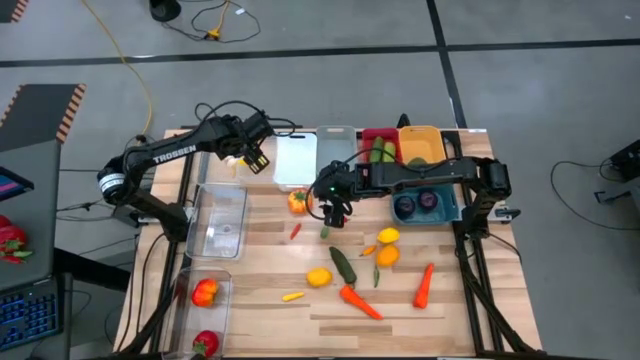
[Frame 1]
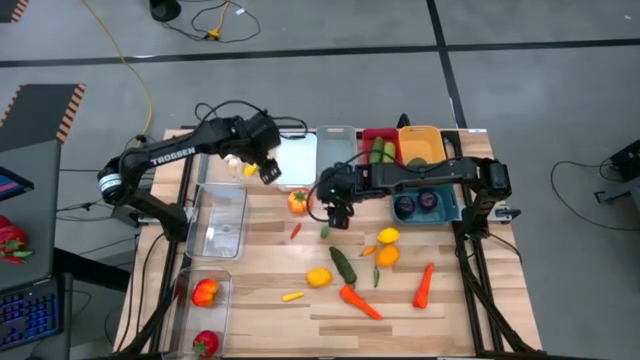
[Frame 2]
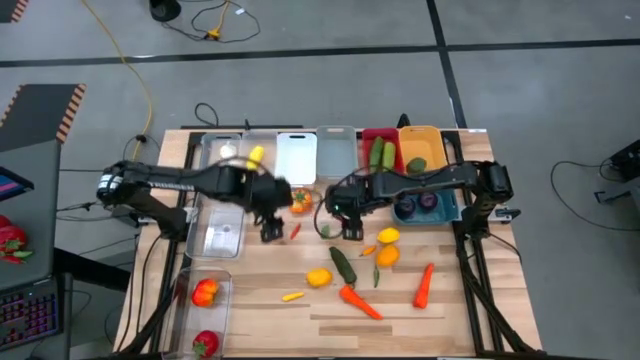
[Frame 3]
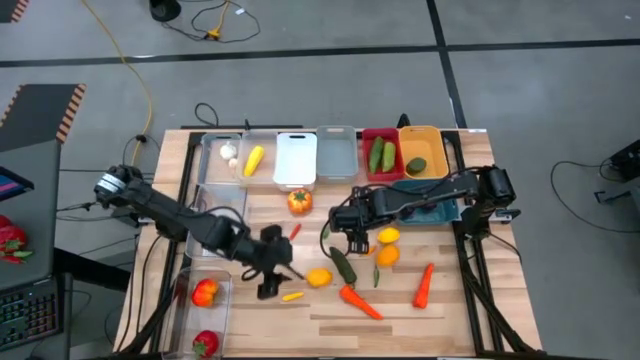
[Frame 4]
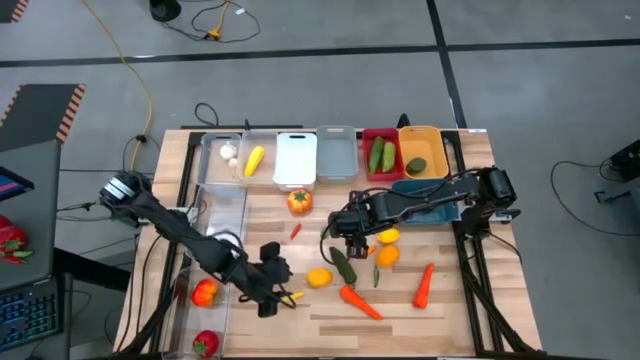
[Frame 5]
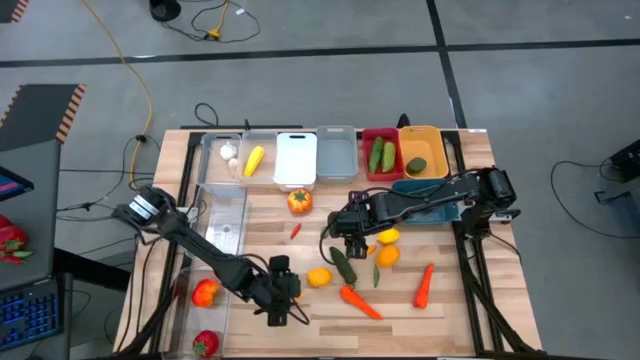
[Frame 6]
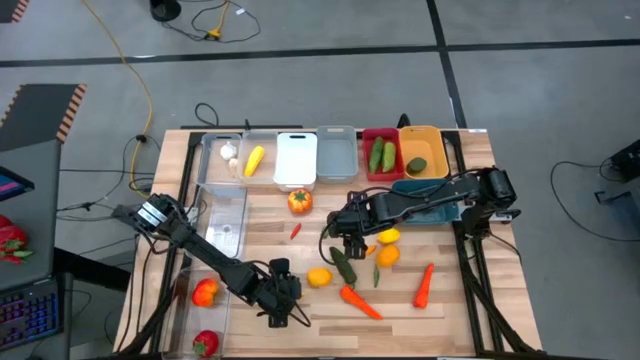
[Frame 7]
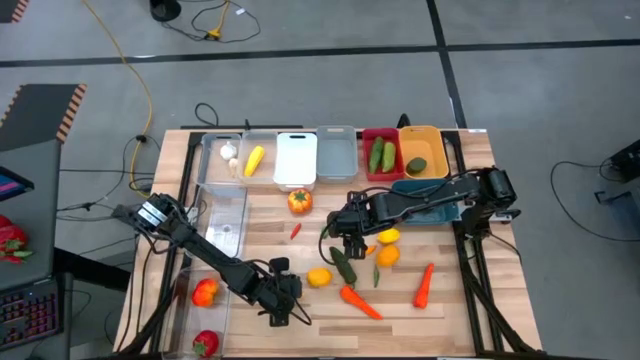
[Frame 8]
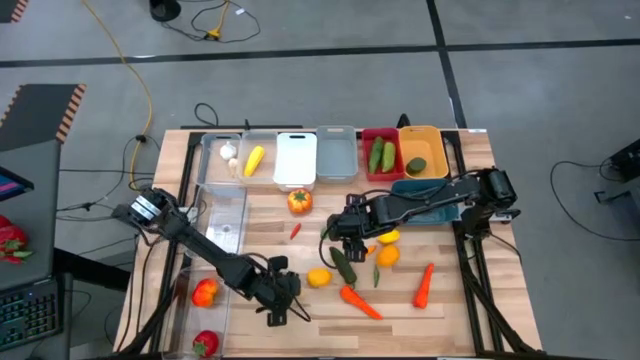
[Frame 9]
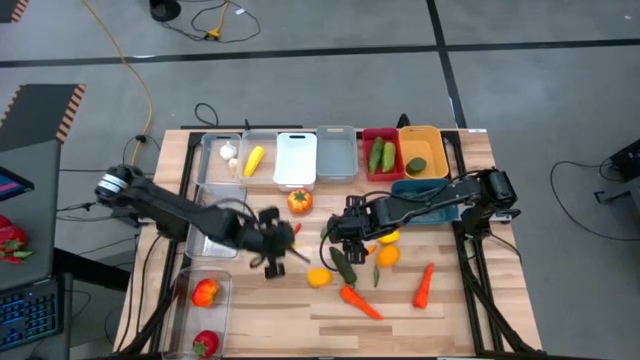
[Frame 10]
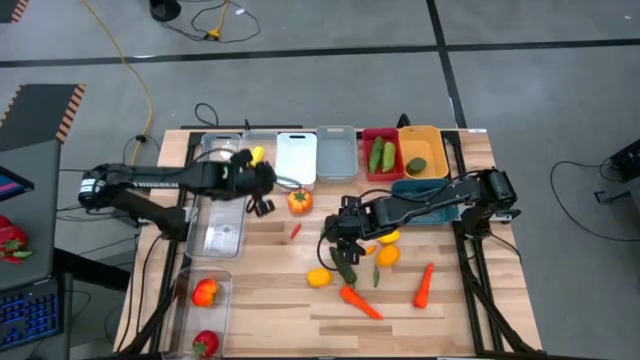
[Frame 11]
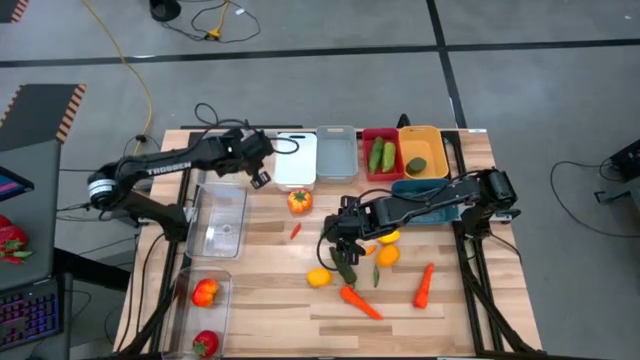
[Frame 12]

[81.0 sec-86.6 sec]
Task: Sort produce into baskets
Put the corn into the right small transparent bin

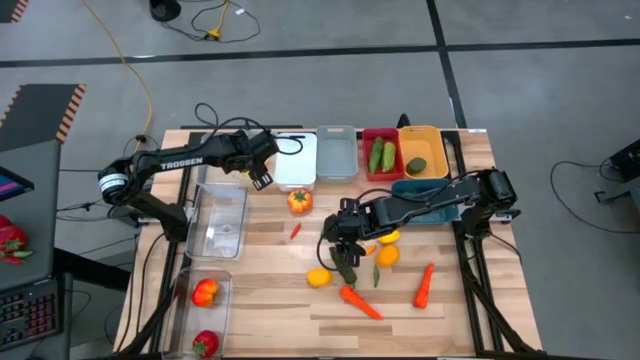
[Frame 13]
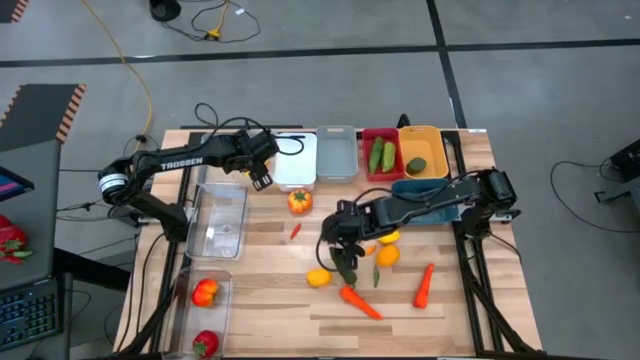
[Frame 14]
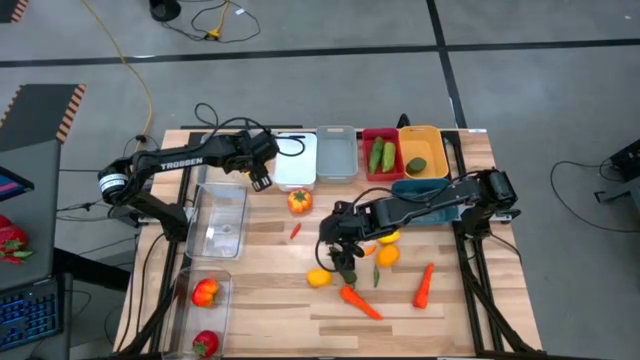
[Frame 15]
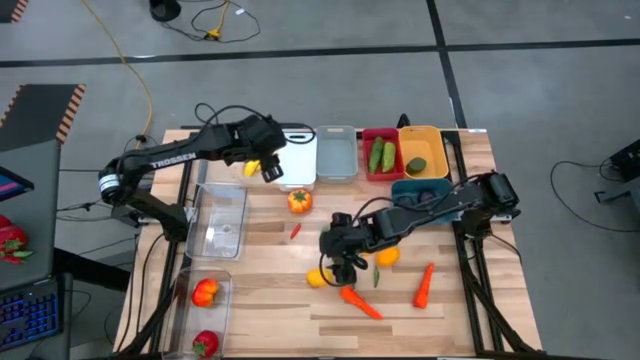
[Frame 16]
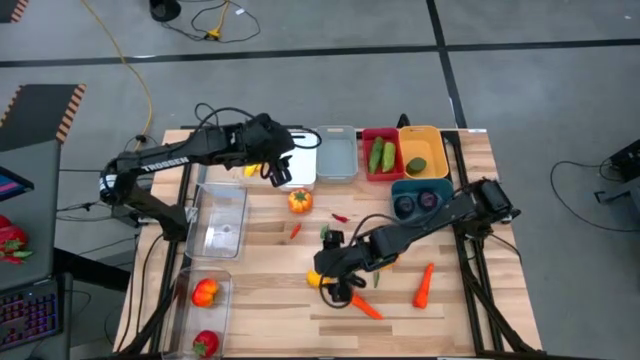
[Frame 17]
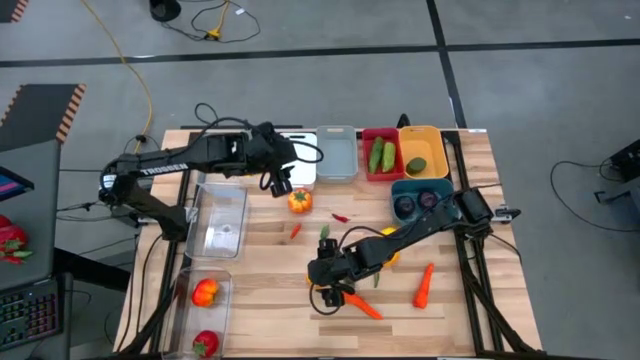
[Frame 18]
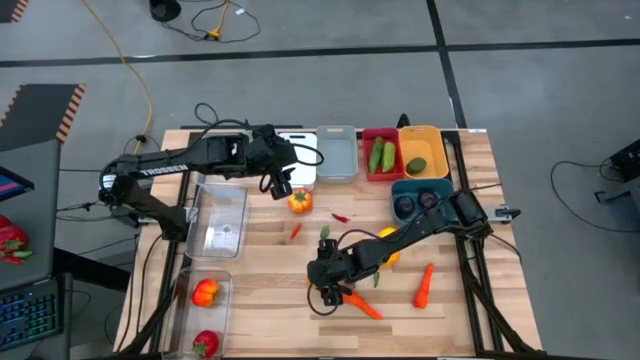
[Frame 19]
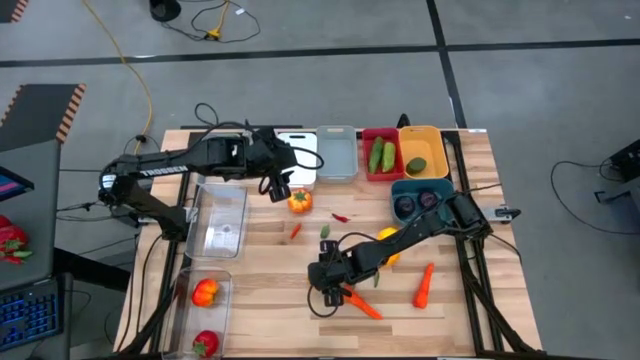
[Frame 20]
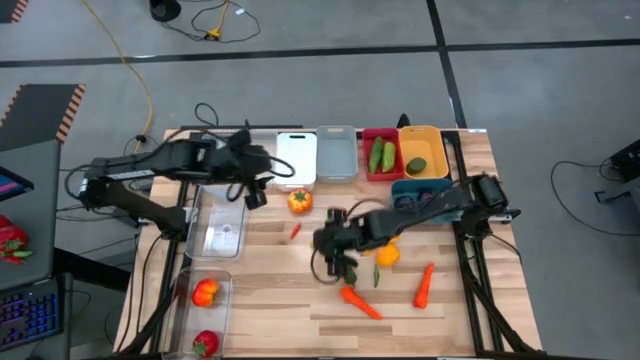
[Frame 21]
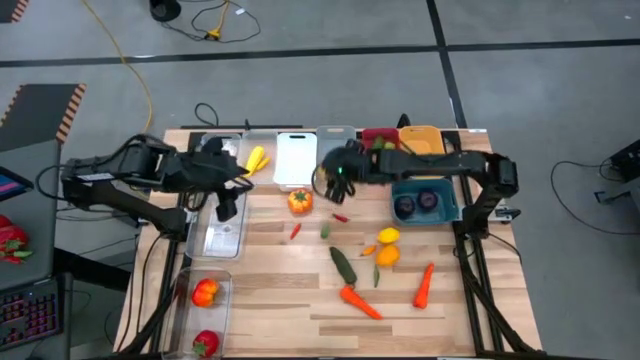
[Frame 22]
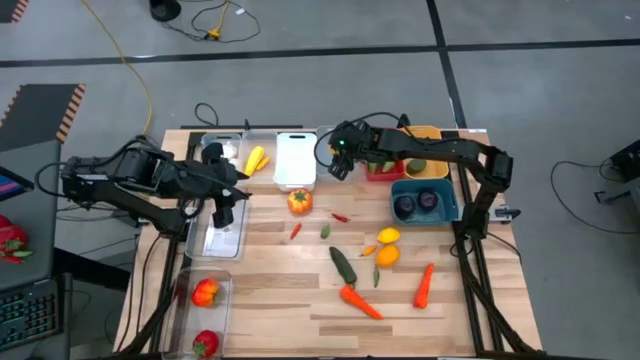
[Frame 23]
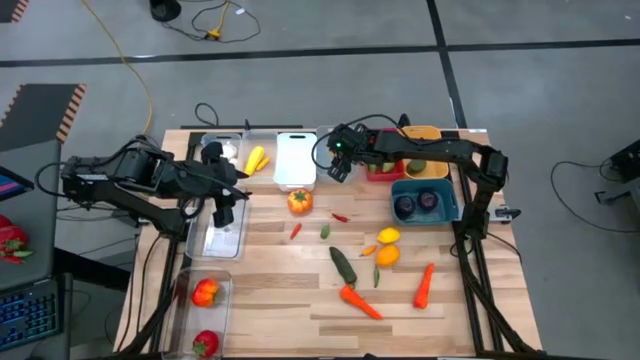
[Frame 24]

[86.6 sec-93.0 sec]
Put the bottom lemon into the gray bin

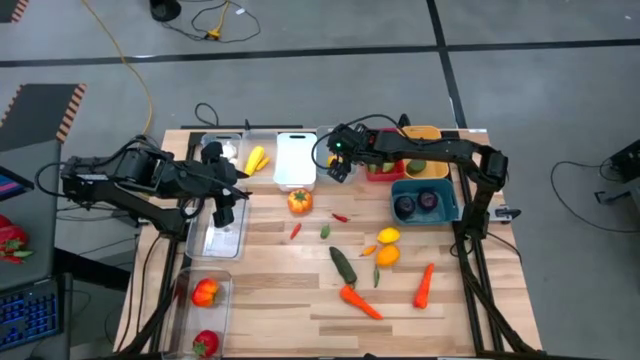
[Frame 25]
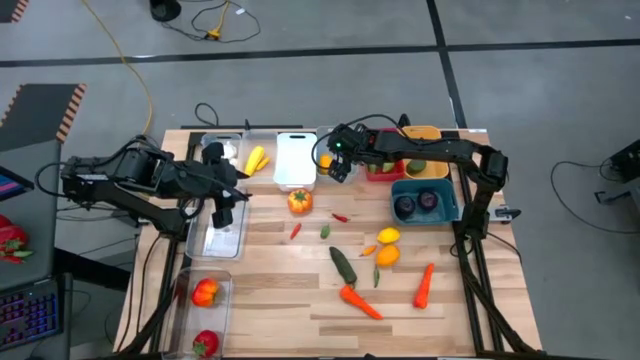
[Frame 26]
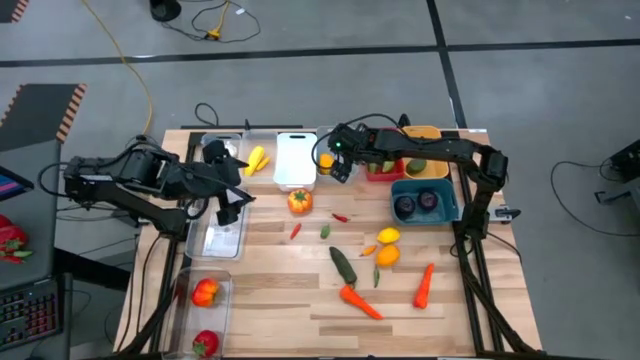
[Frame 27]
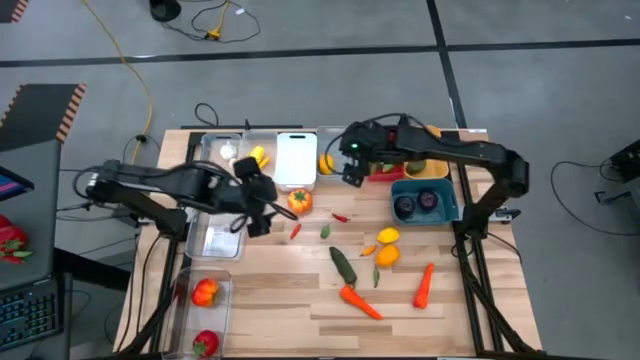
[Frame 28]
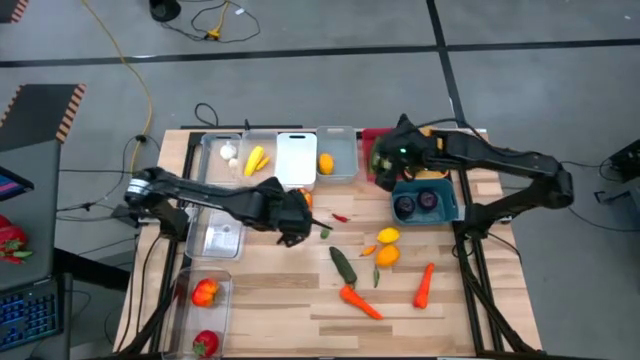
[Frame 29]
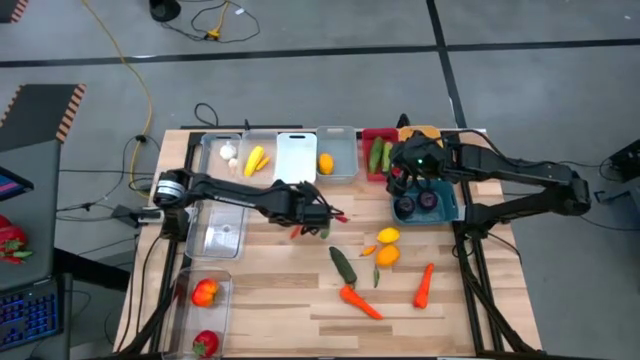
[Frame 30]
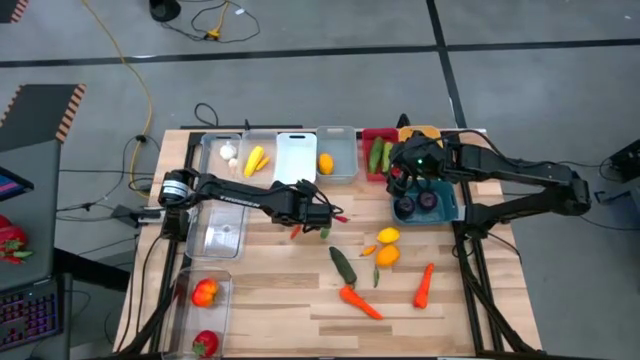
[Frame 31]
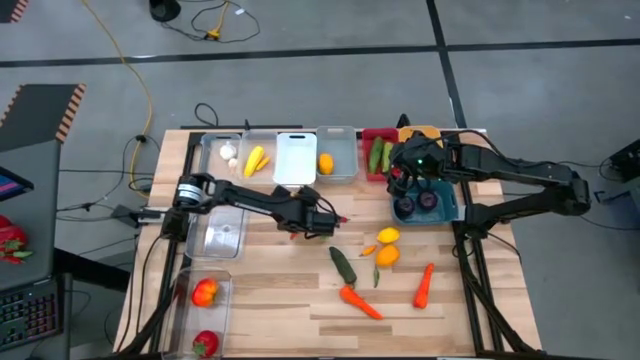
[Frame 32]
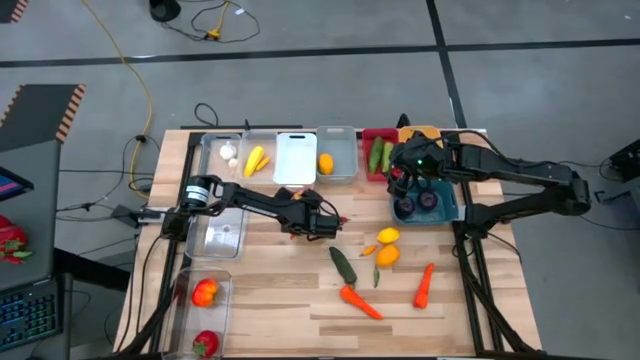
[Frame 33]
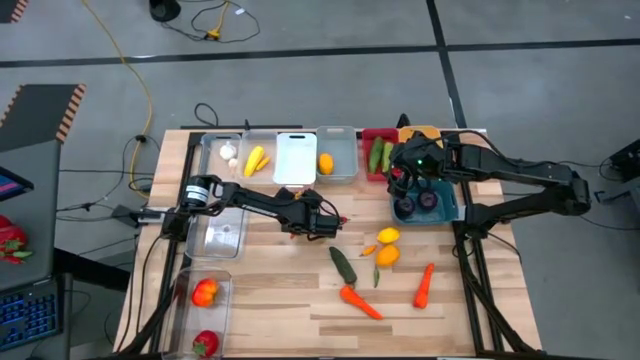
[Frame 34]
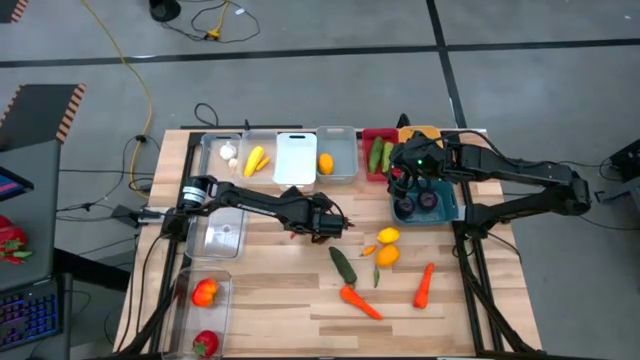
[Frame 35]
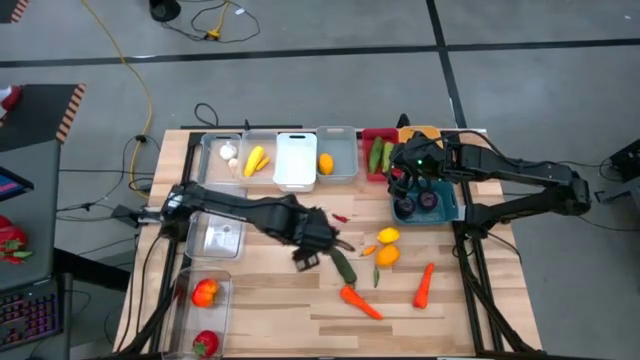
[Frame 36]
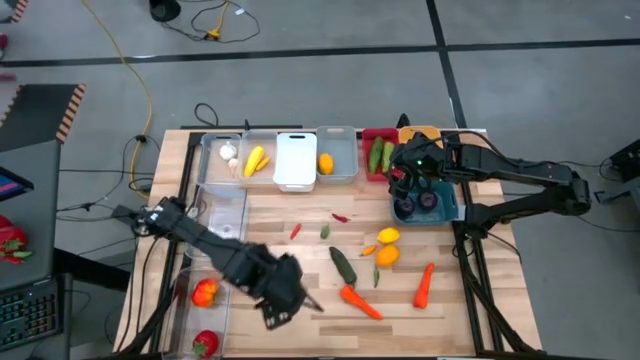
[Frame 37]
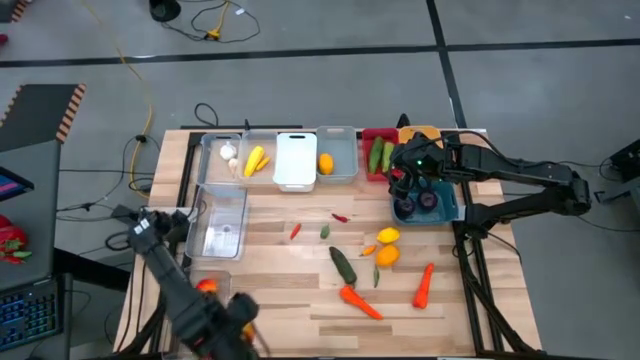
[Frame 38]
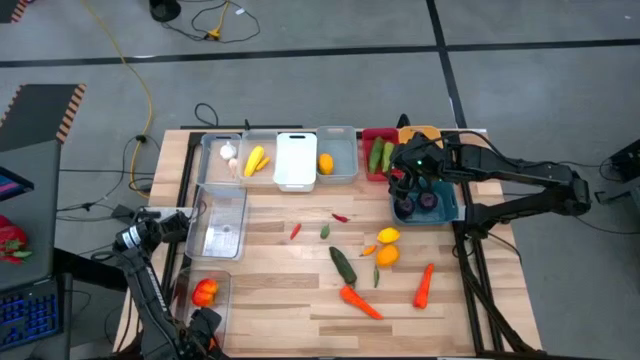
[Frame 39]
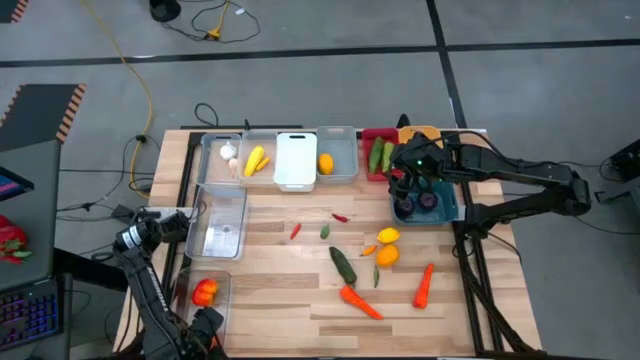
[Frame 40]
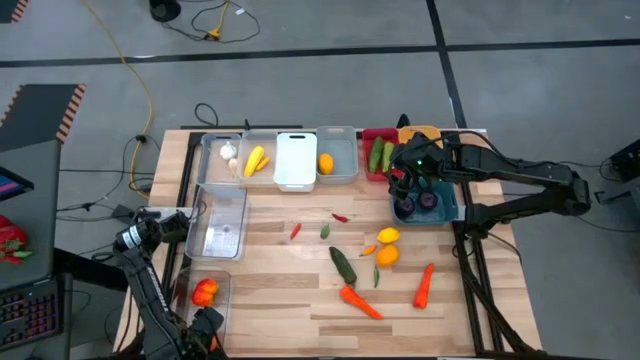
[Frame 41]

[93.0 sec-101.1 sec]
Put the tomato into the bottom big transparent bin
